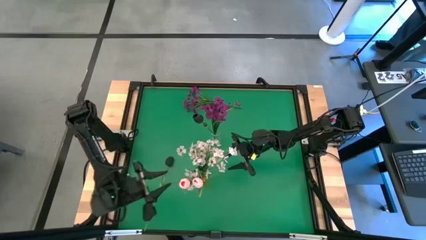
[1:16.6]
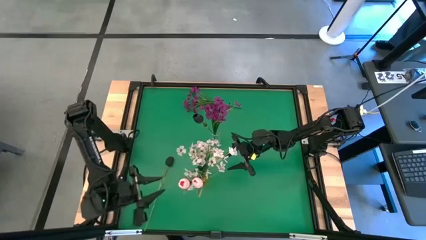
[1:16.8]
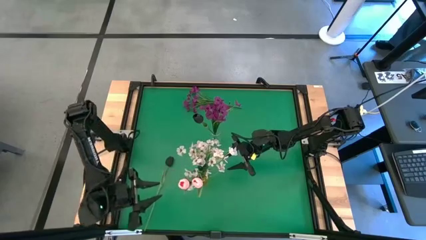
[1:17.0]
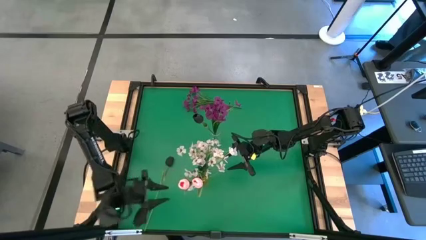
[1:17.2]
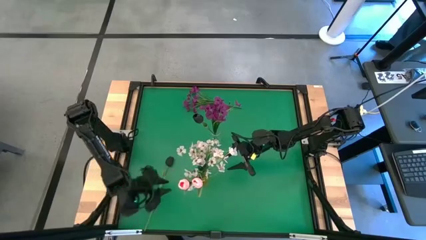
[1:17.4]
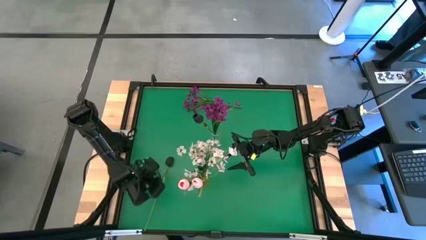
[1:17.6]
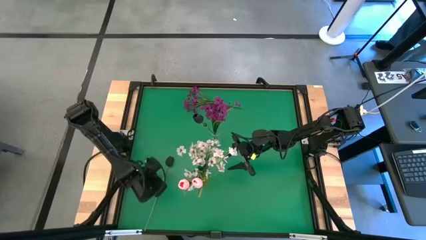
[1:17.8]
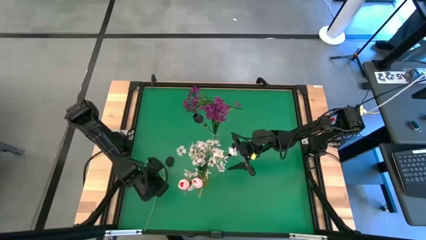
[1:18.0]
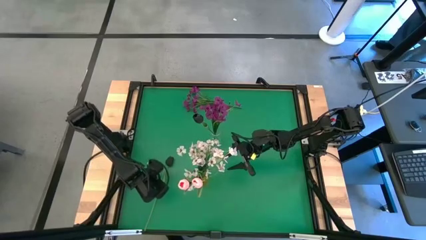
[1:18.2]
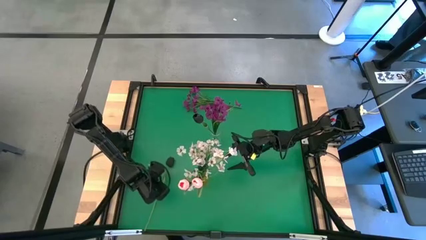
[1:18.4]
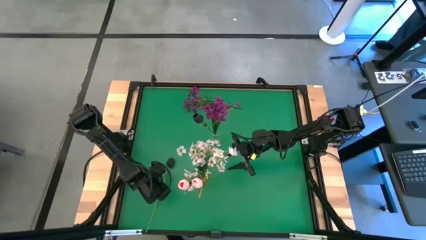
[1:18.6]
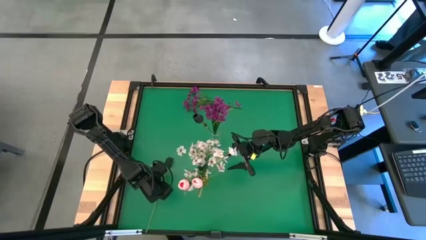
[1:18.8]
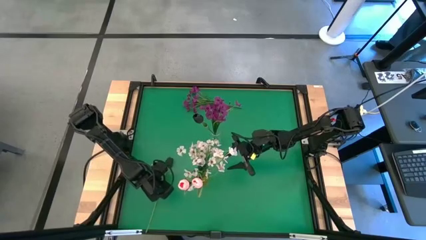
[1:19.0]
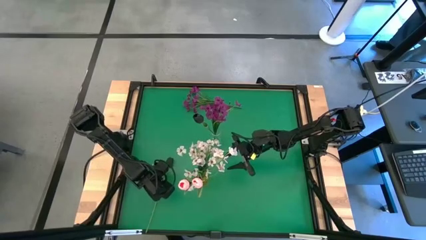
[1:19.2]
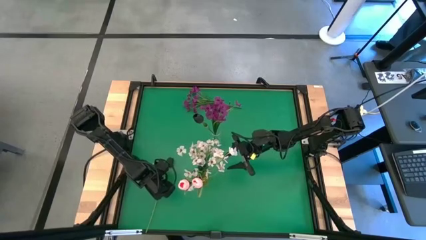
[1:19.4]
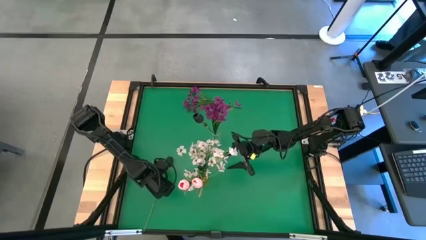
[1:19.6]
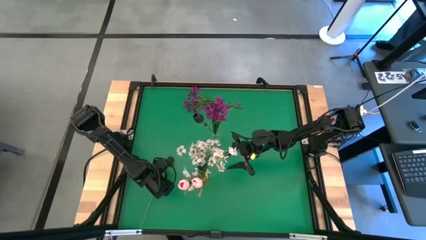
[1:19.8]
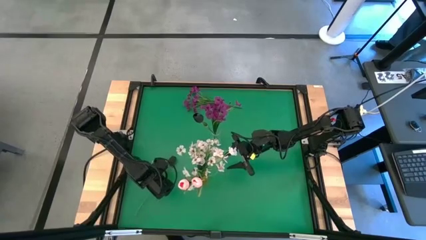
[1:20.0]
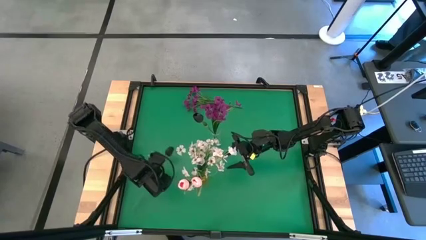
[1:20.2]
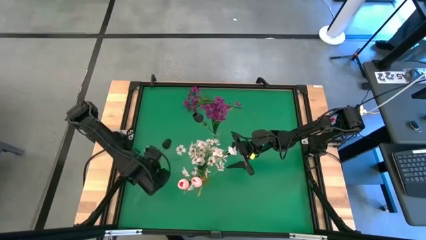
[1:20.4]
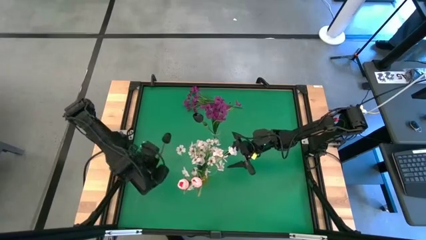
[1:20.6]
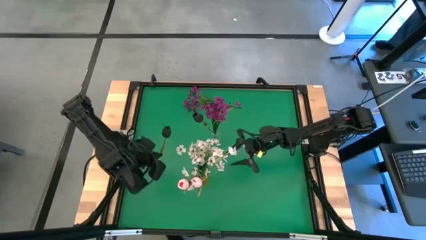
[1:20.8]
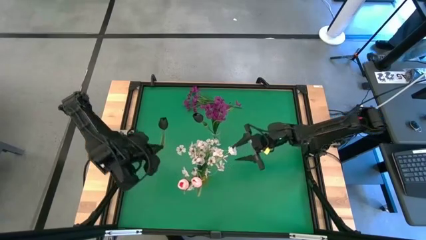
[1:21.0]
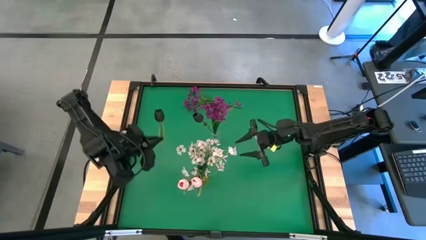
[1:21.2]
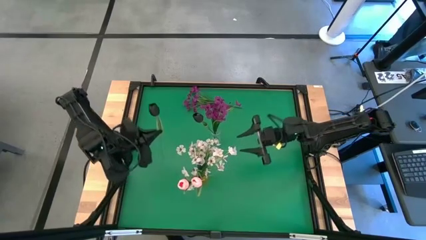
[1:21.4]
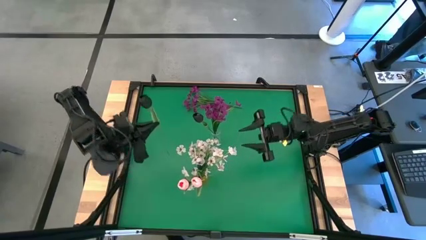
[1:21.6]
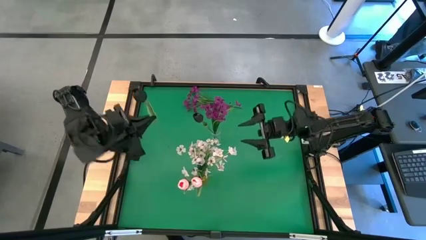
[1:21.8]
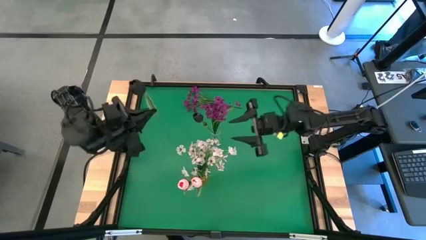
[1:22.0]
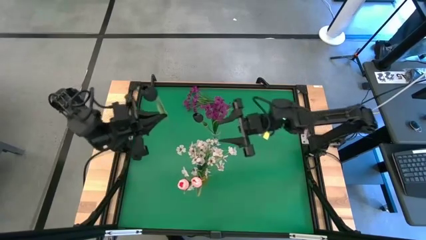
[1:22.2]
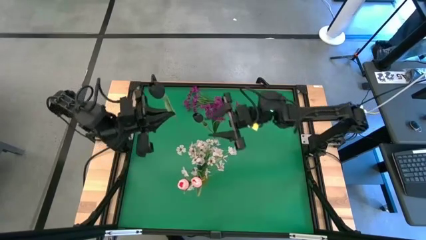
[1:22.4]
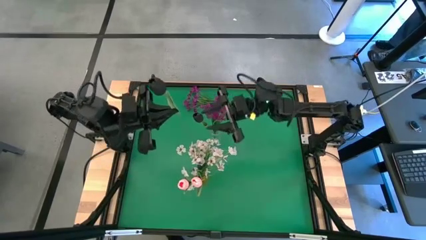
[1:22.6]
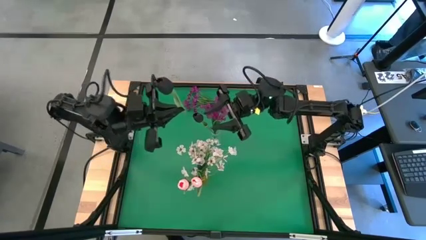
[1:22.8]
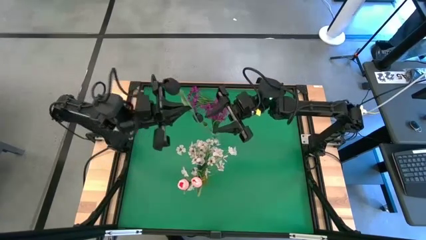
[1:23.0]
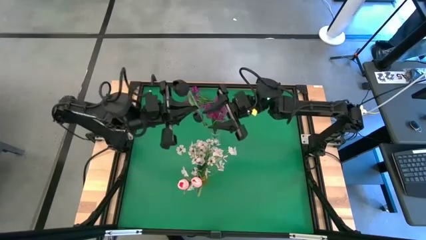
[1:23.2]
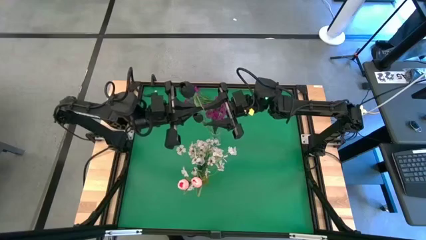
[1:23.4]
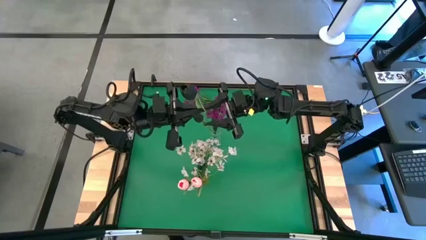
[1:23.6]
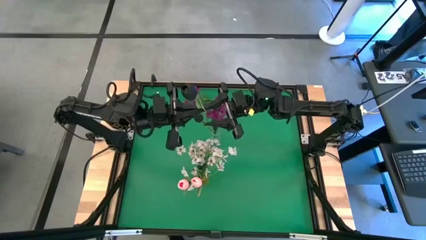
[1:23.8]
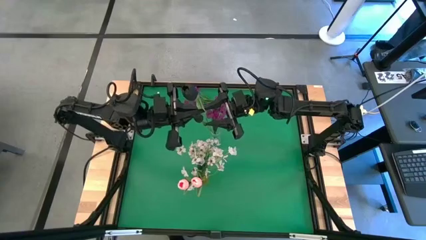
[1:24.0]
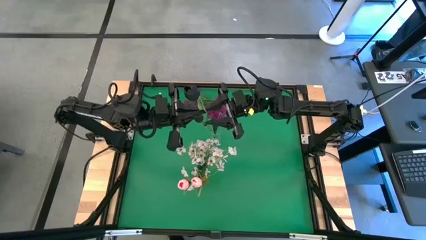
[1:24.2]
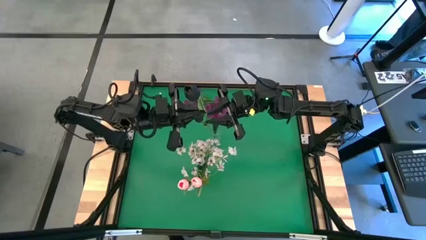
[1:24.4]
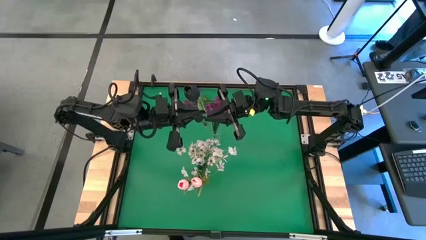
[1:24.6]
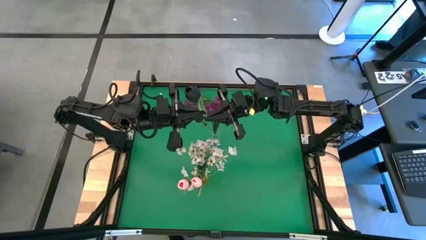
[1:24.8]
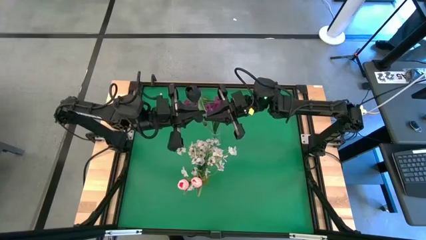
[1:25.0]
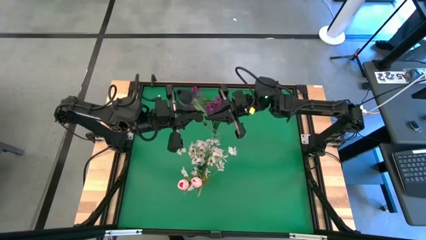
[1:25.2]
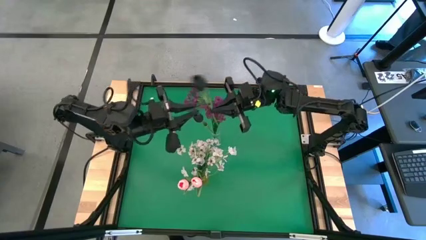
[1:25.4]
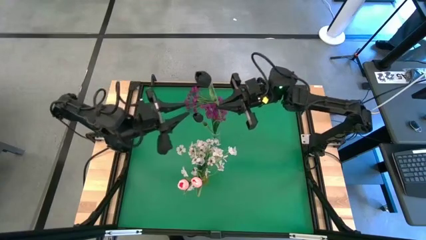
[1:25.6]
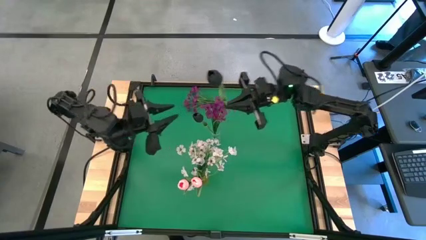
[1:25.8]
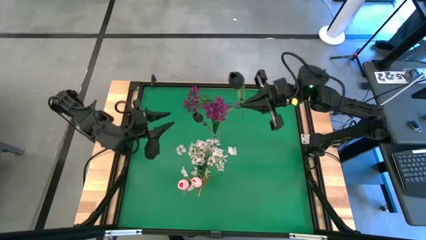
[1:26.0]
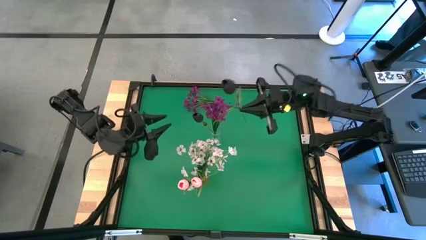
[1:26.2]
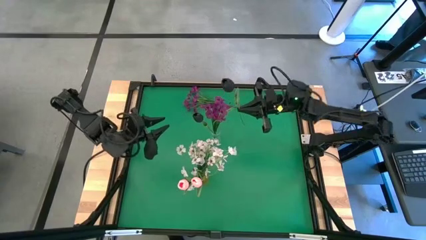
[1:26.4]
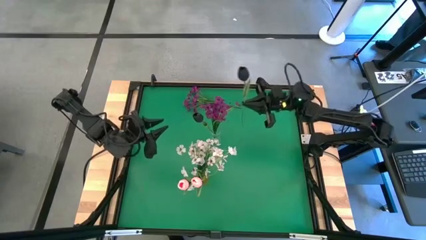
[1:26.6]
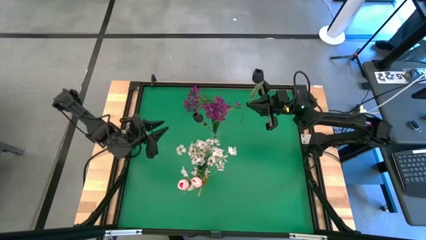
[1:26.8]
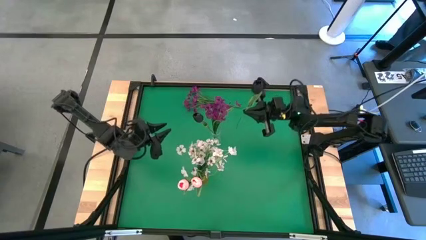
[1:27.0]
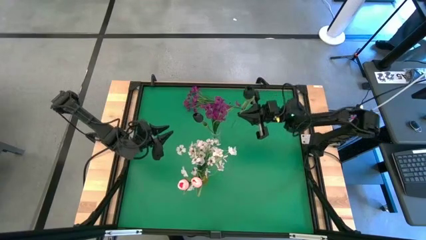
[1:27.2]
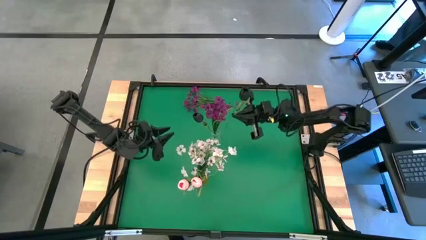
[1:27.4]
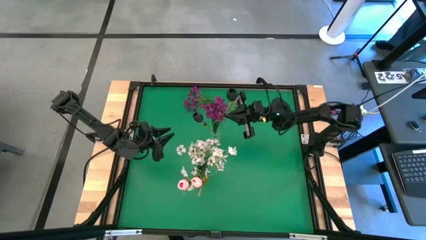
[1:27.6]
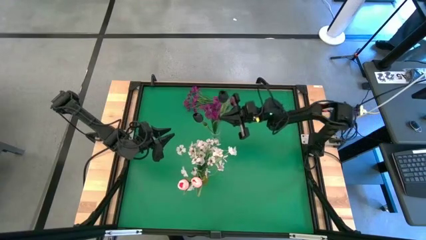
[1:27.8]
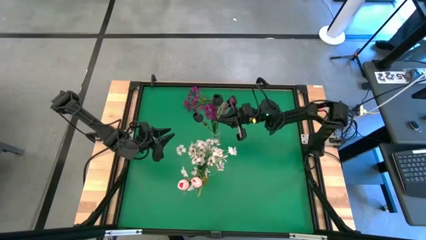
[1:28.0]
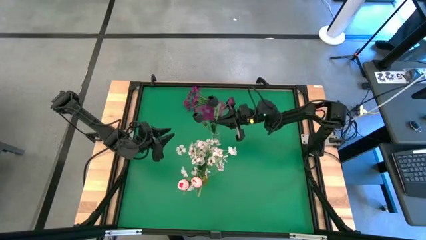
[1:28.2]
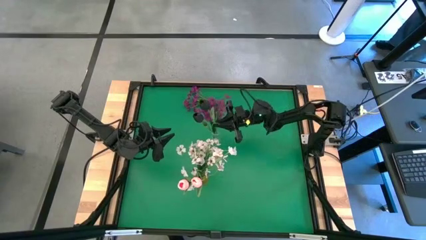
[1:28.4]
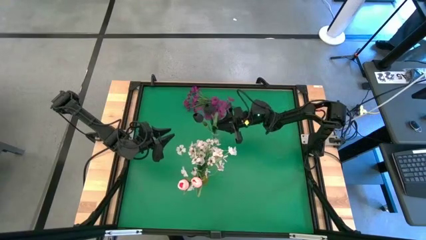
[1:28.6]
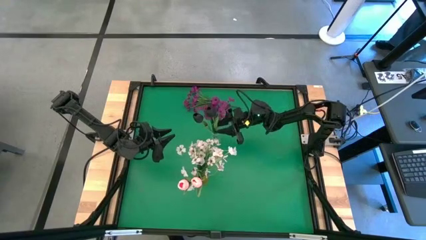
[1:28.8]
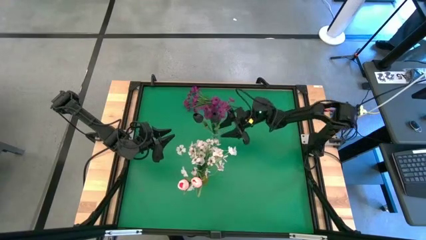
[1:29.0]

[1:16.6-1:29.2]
Task: Sort flowers into vase by color
Put the black tulip into the transparent vase

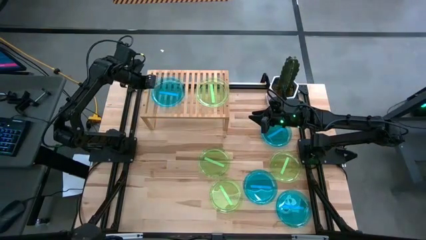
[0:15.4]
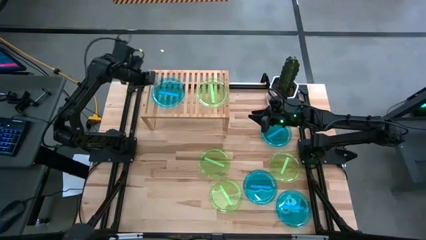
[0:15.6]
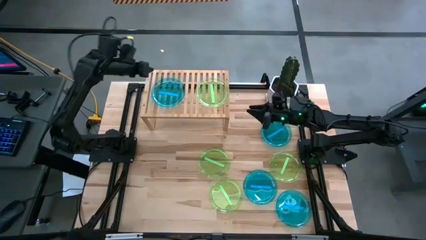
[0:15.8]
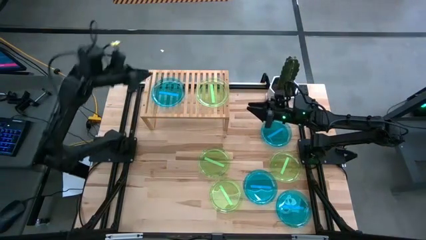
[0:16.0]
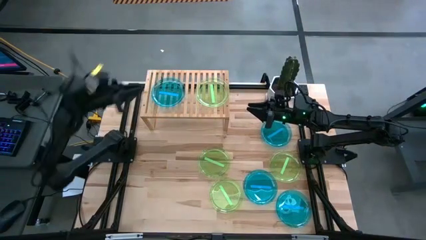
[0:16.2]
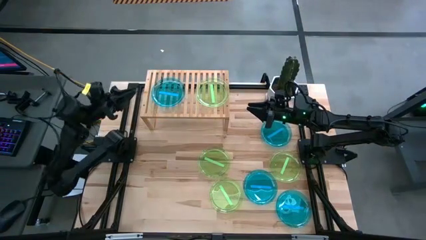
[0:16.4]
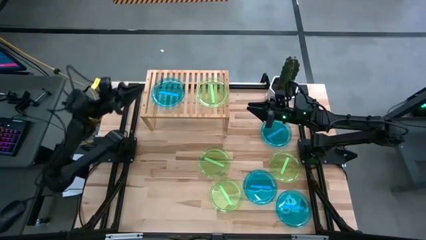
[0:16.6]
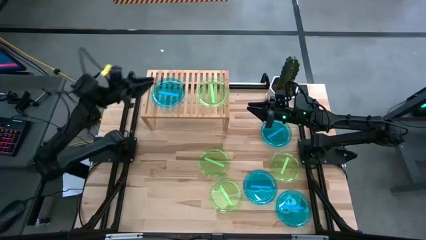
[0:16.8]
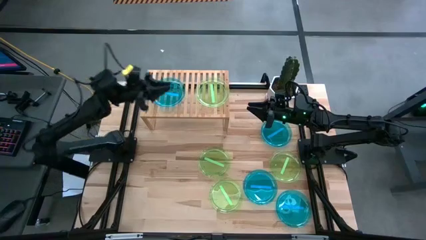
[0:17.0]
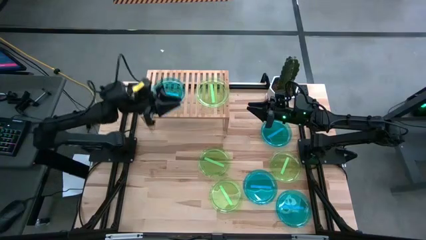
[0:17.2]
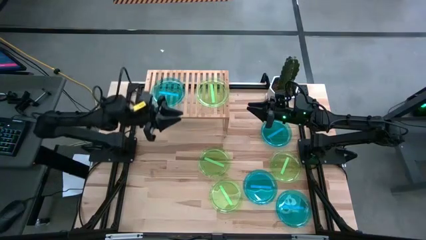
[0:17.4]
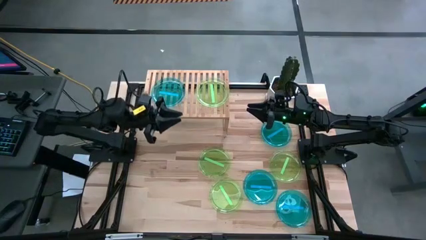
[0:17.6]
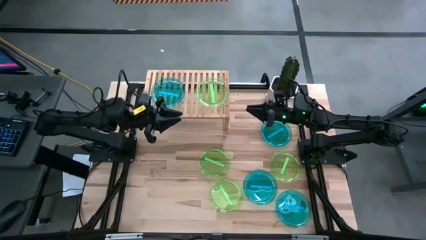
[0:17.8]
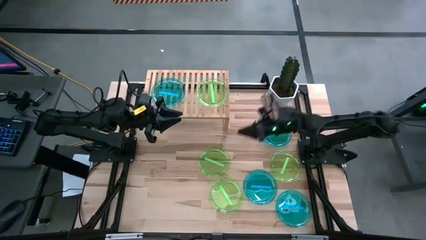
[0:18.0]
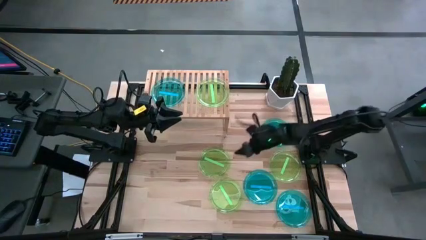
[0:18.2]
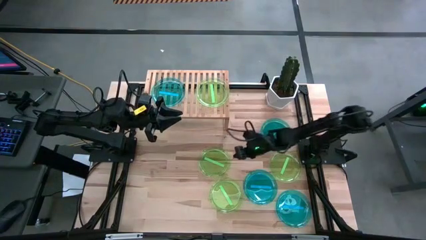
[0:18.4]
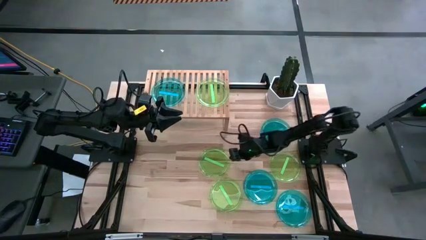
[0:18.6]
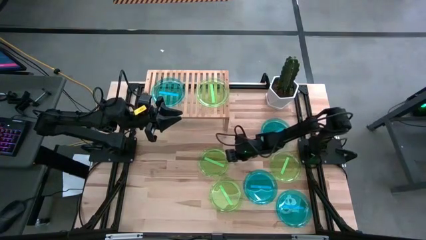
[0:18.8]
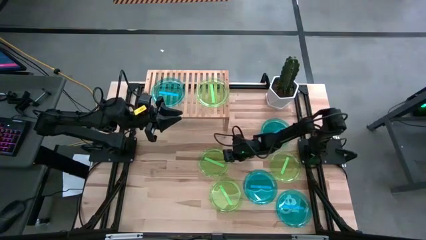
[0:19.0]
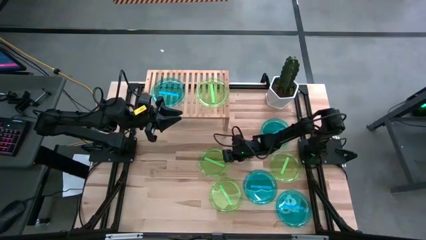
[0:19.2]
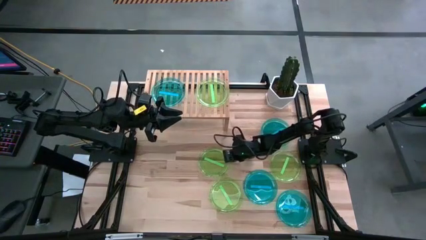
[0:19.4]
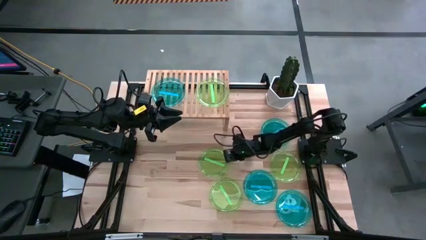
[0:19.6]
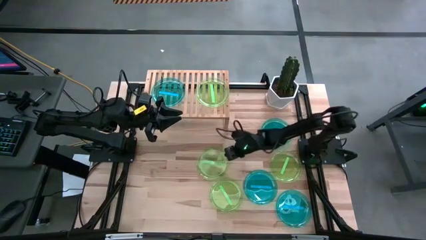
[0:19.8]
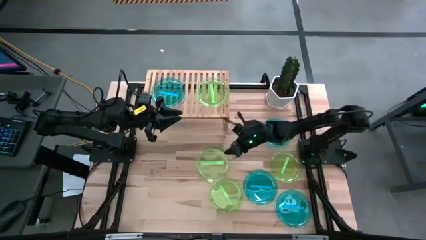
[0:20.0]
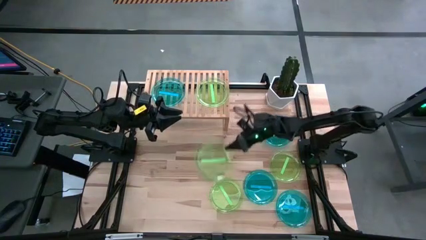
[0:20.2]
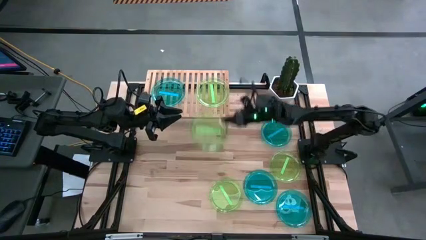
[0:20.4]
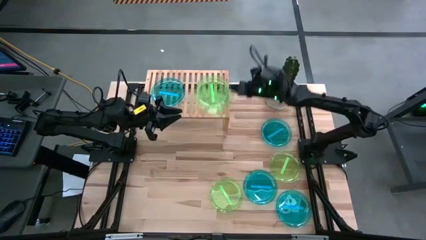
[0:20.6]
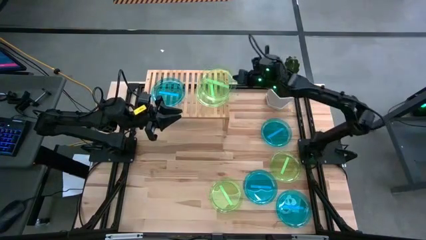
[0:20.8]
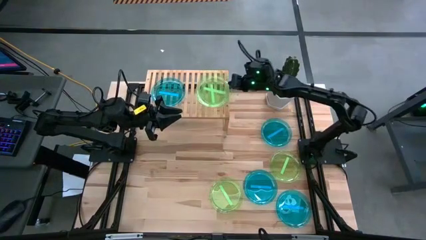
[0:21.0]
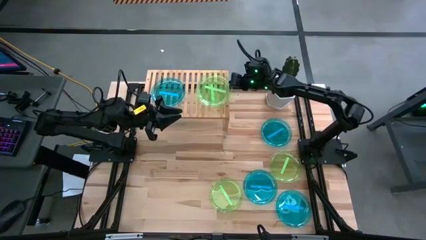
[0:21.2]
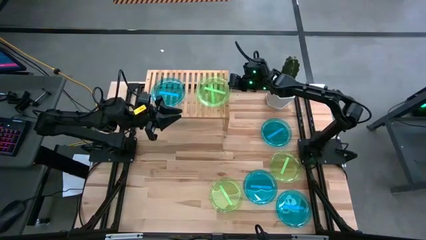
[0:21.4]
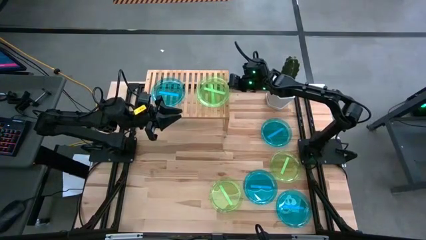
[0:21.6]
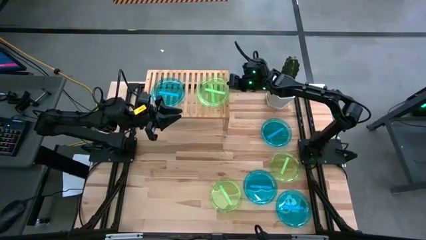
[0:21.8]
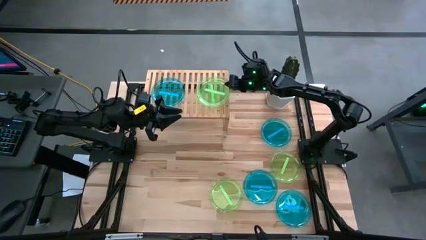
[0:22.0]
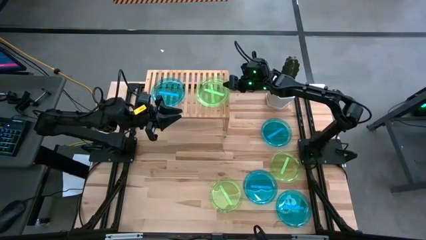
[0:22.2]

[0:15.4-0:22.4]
Task: Place and stack plates onto a shelf
Stack the green plate on top of the green plate on the shelf
